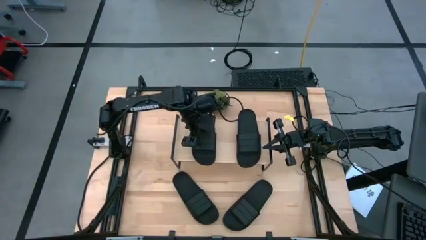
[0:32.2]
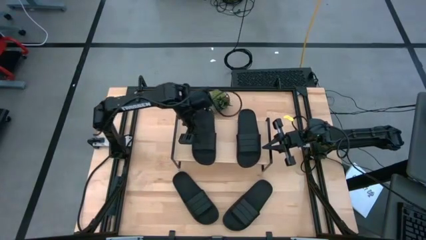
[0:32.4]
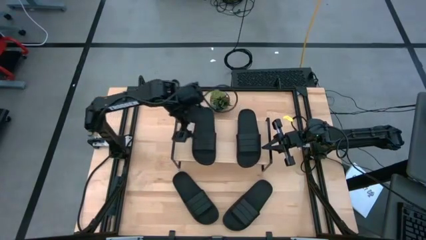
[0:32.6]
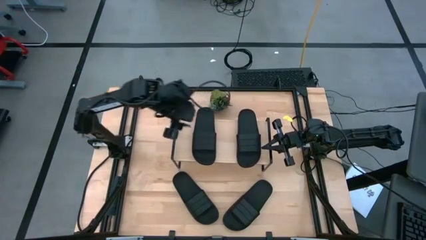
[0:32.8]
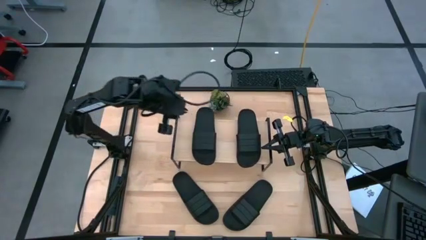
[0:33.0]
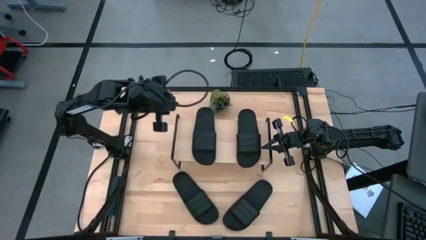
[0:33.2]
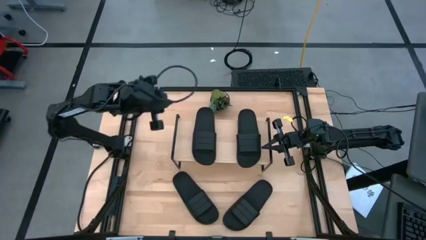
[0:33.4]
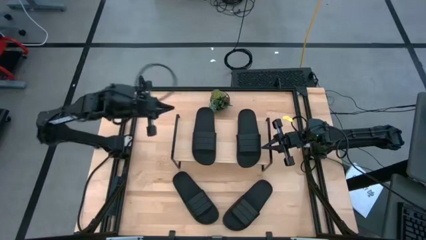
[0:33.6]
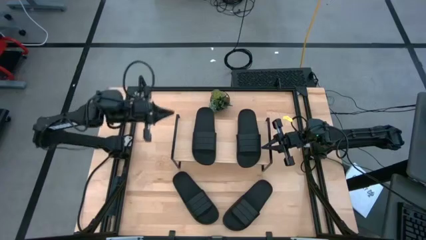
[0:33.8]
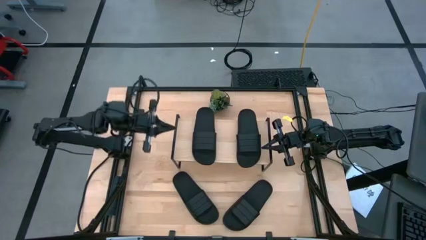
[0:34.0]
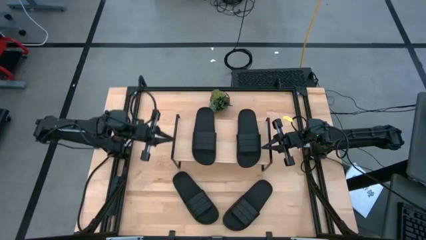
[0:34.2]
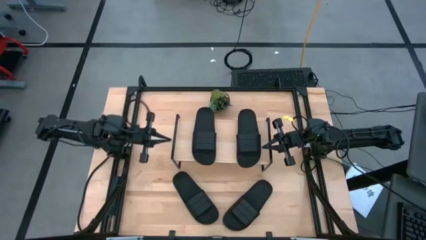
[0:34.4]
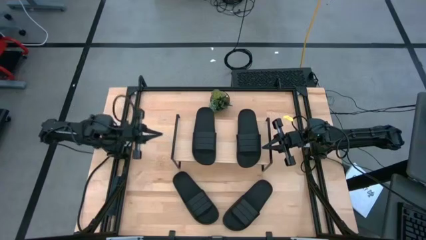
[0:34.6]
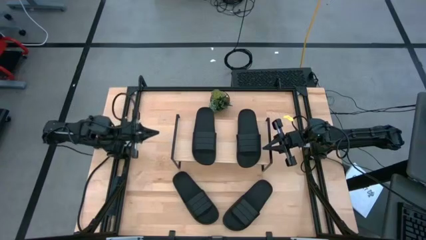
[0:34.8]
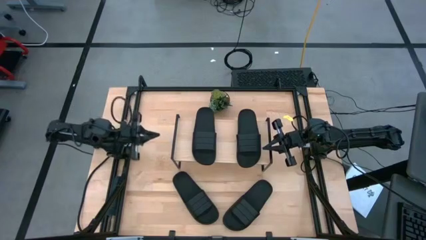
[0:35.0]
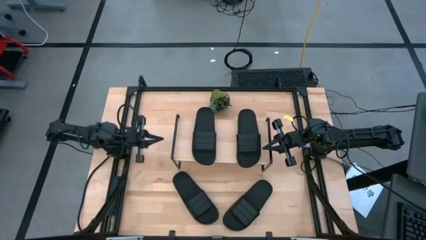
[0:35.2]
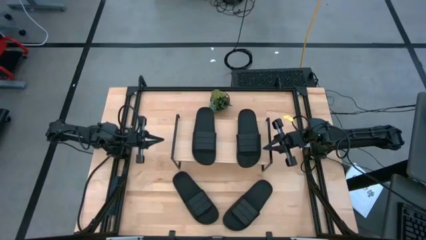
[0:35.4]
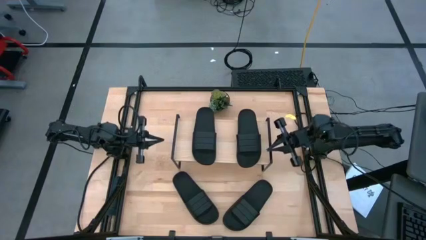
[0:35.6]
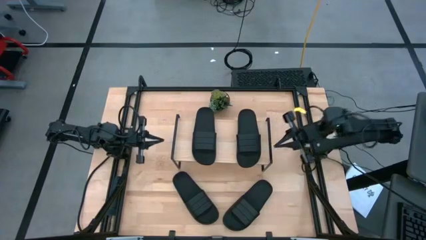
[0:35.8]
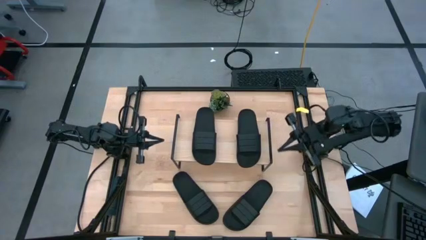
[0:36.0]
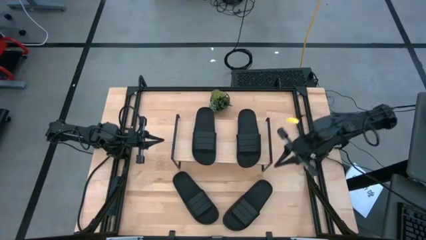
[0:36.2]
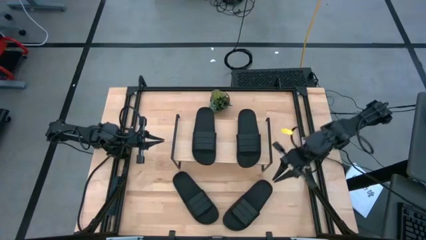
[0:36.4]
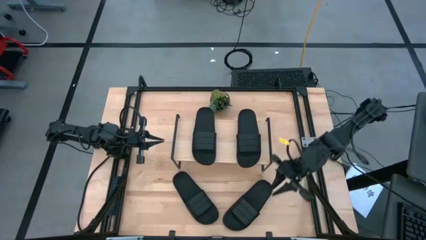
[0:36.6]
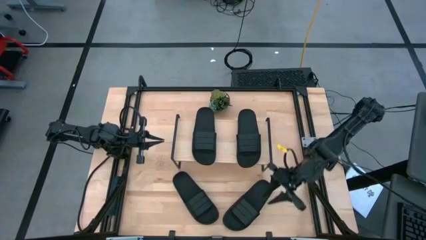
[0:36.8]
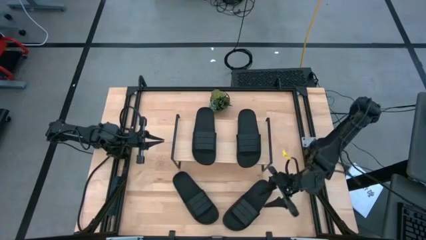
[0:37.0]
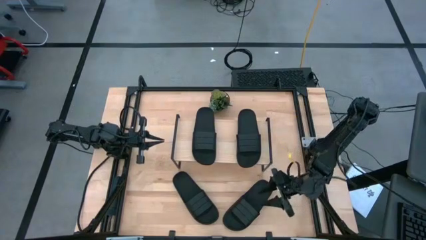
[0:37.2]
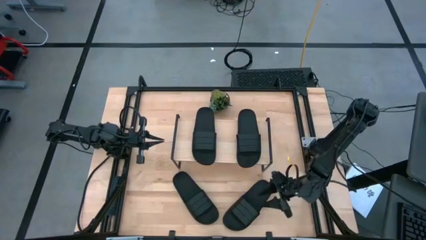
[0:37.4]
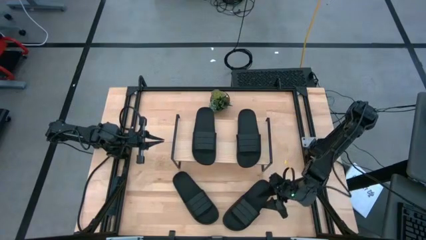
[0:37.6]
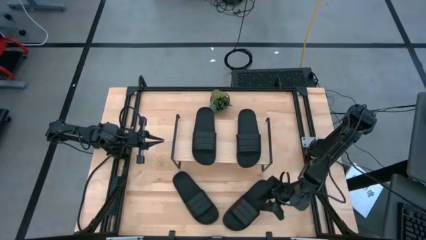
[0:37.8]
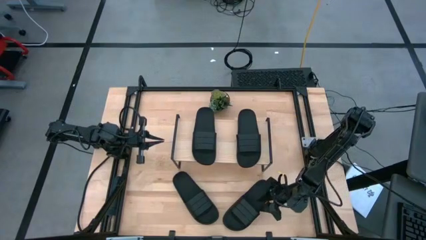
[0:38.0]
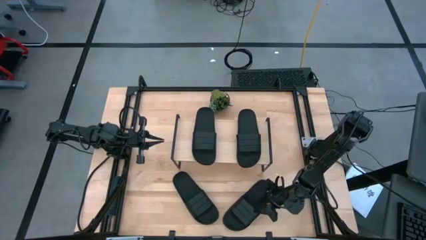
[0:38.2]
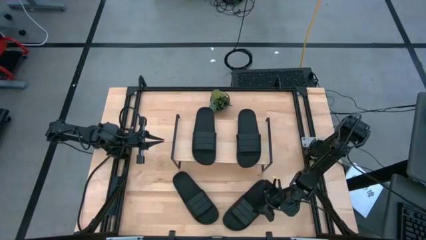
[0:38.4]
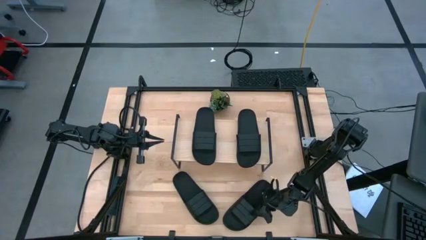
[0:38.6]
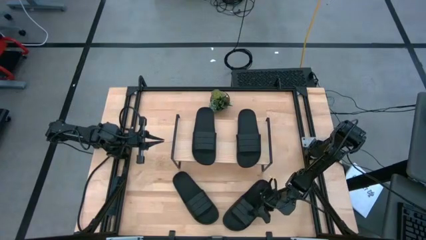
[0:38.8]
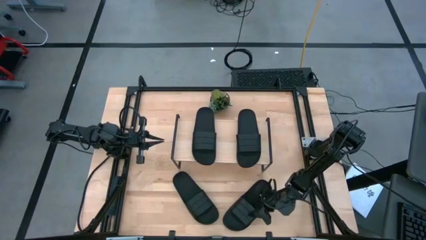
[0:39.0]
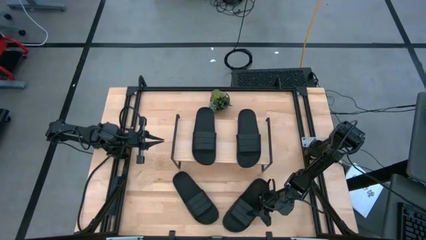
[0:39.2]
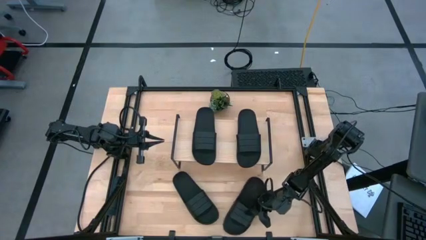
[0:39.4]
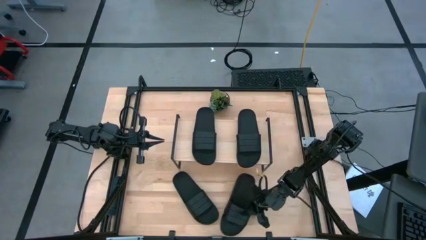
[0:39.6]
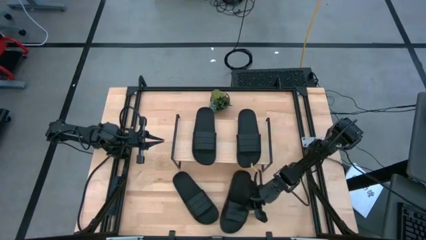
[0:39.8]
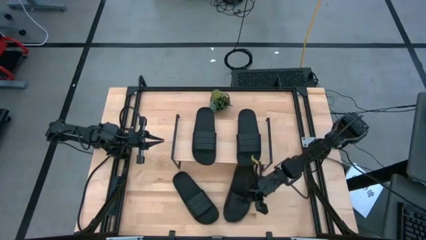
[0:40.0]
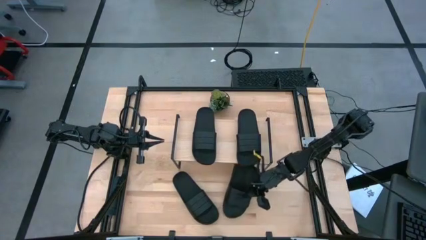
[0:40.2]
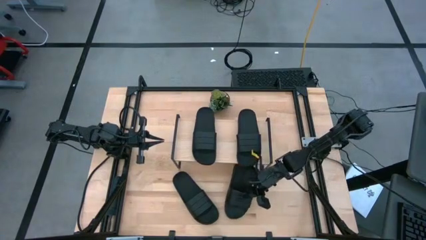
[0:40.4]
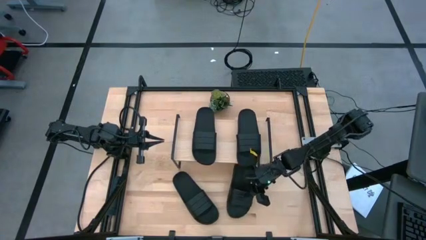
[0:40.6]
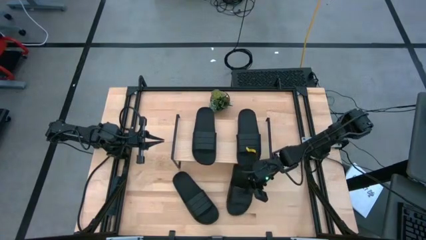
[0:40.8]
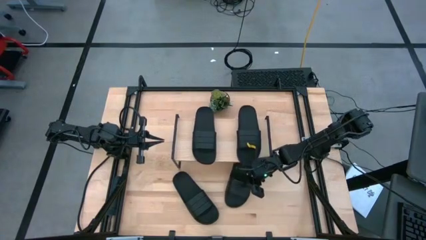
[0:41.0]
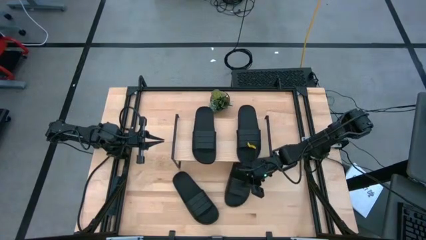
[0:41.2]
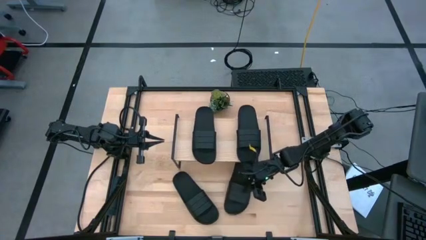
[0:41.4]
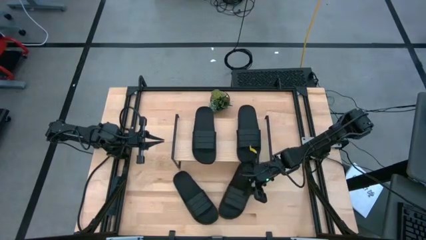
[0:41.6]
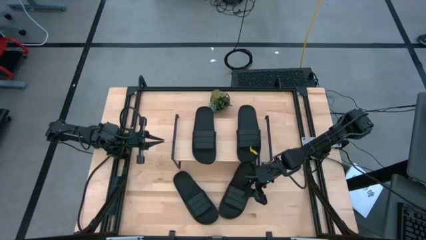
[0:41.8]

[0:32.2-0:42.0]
Task: Pick and place slides into the shelf
Put the black slide under the shelf

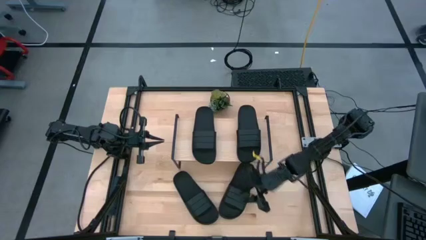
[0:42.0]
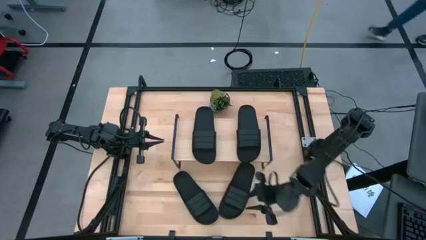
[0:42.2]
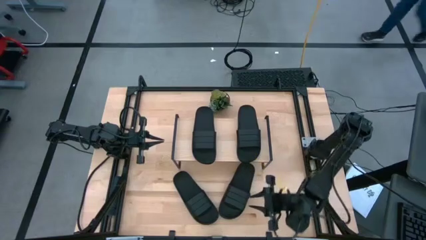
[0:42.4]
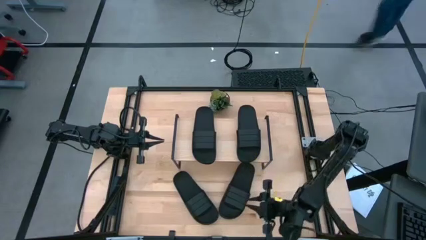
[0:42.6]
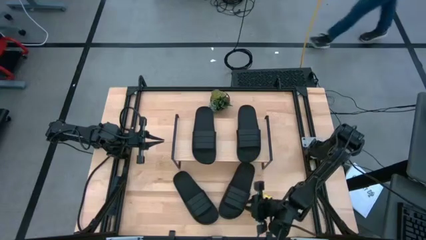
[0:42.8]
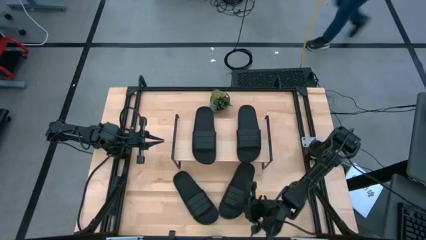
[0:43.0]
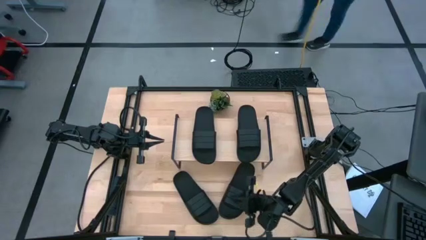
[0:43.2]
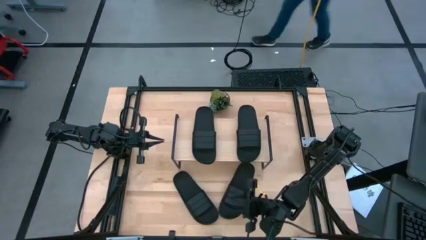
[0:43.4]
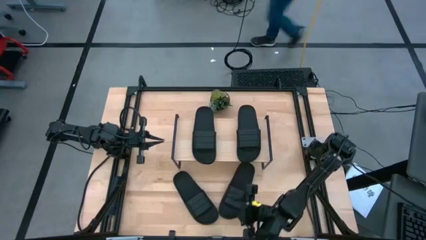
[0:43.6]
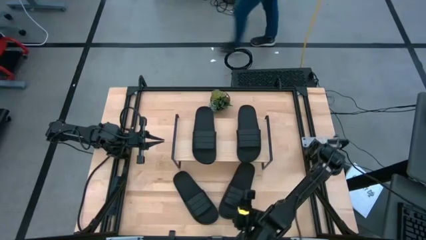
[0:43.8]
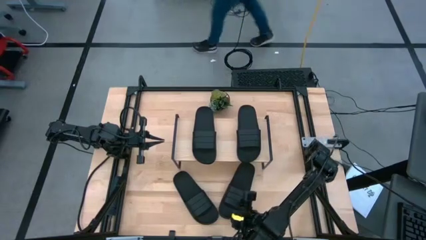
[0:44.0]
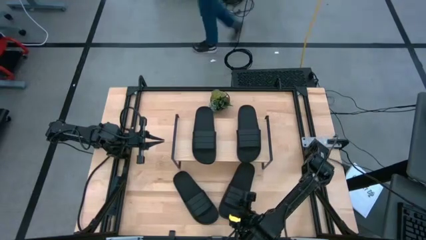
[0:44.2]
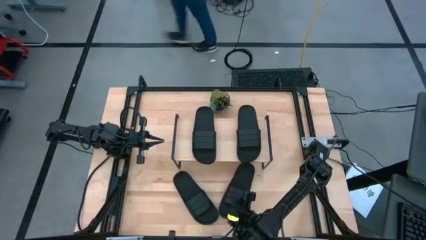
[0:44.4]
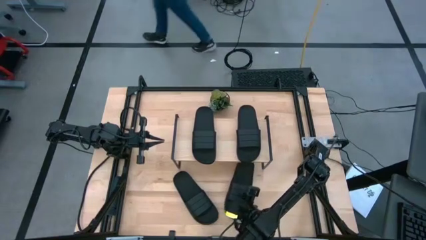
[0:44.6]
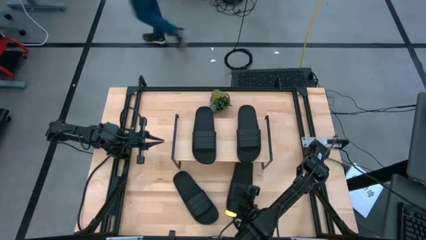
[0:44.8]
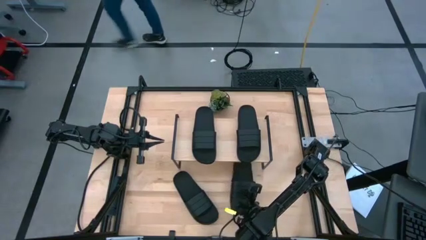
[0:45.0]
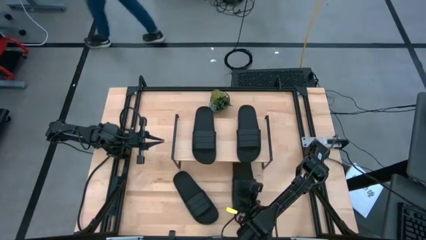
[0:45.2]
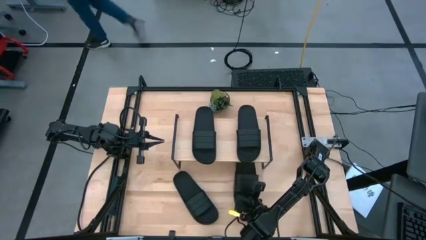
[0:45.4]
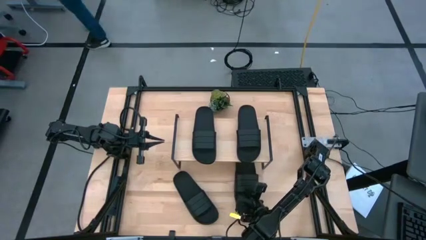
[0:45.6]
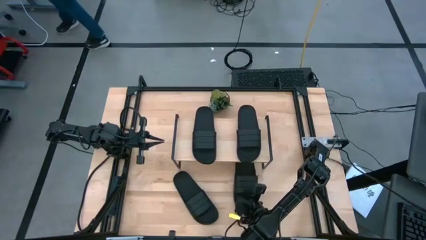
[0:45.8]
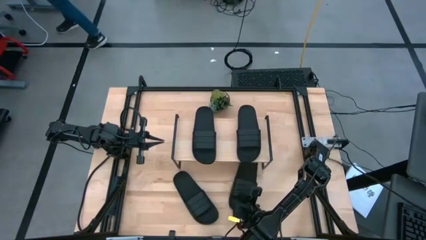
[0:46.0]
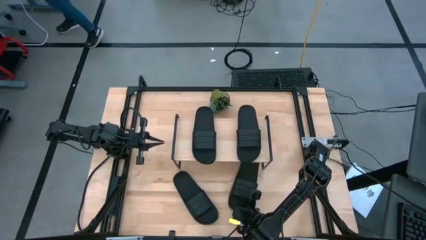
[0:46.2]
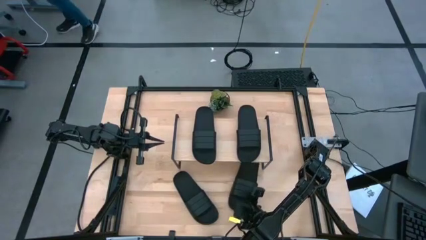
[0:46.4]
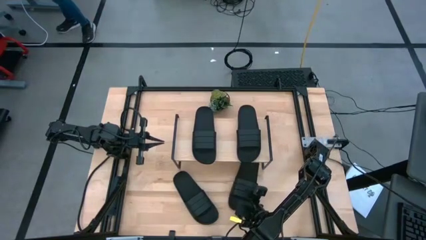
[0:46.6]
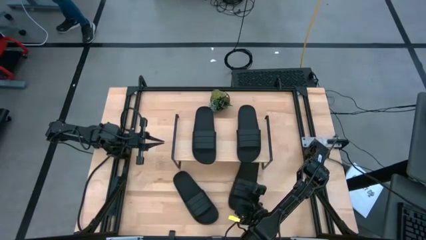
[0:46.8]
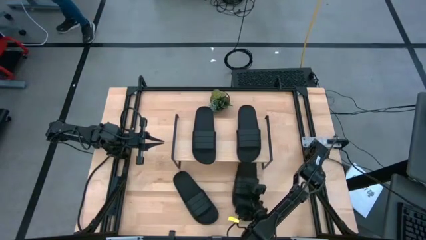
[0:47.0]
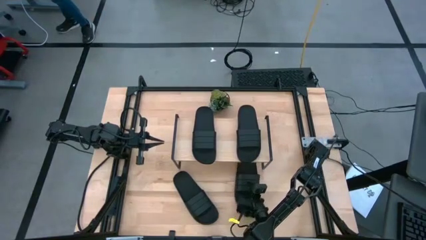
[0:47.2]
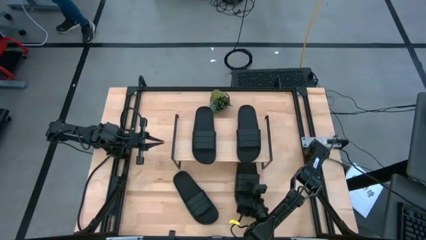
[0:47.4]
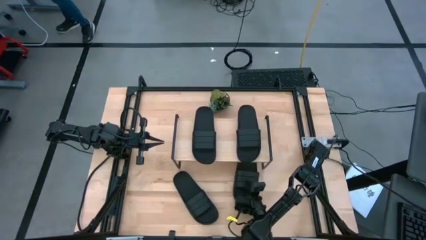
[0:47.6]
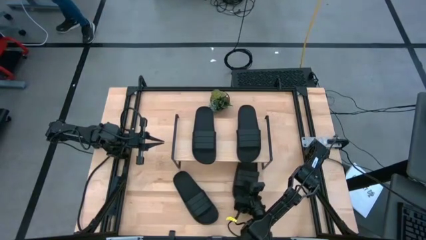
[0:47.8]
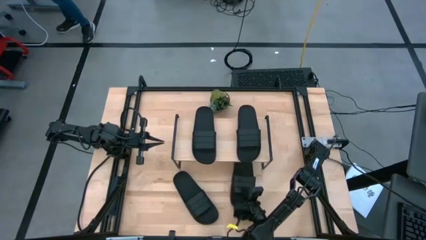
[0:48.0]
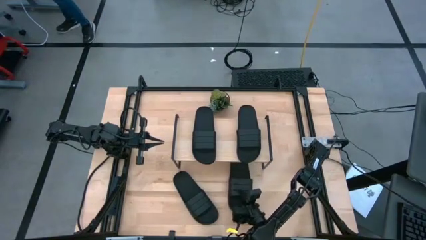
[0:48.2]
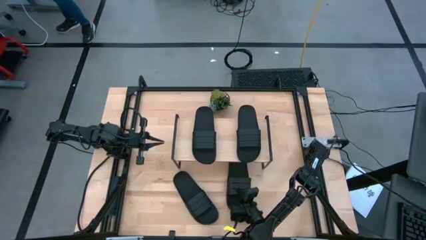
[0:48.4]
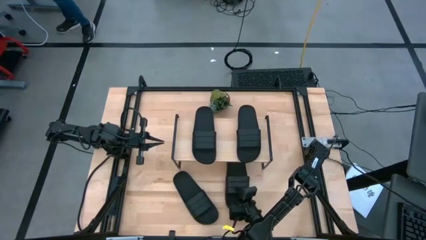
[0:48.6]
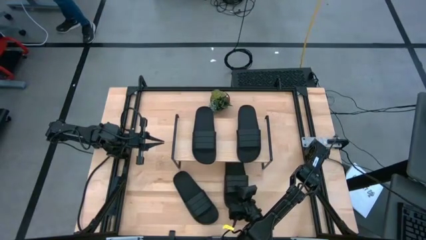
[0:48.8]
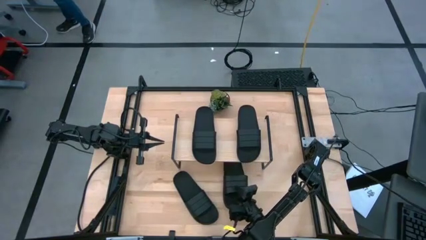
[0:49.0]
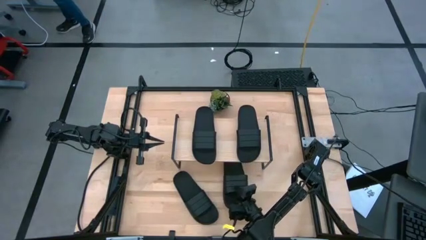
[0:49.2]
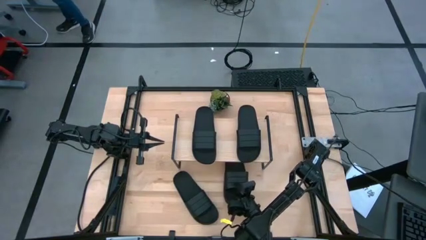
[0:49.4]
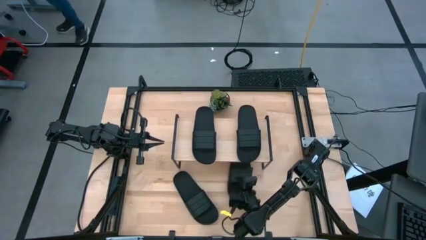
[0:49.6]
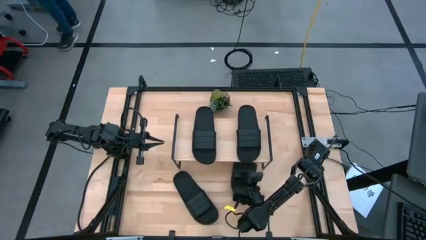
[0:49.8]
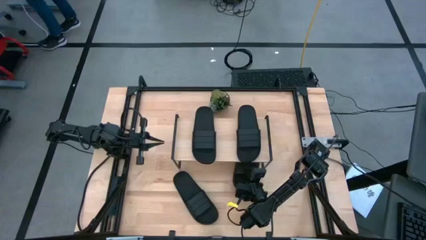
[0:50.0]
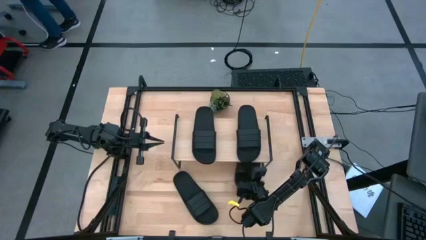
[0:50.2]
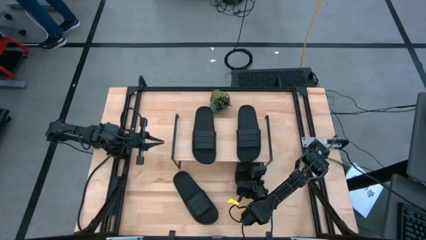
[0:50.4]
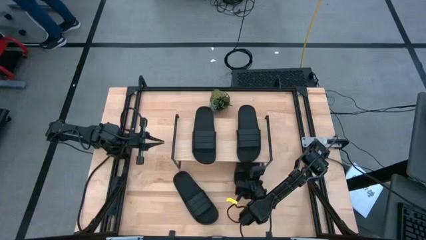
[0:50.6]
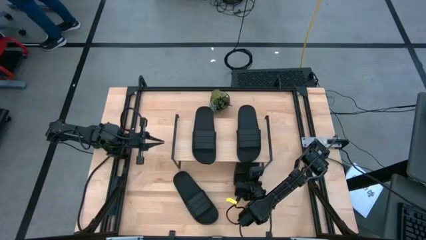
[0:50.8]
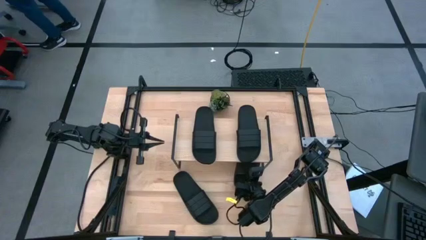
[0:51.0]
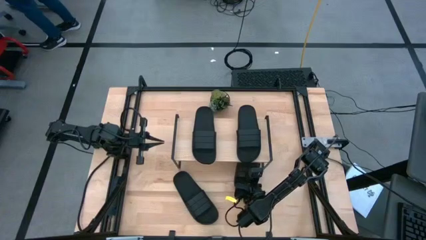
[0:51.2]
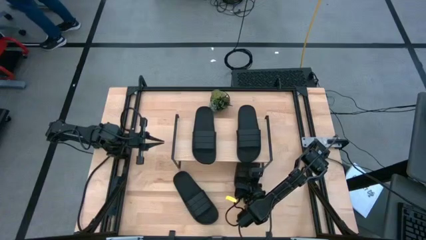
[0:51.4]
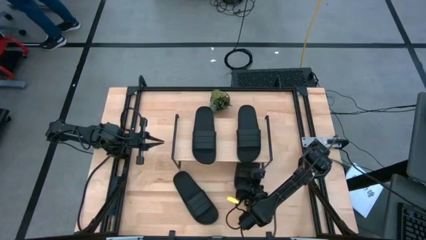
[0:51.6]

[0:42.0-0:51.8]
Put the black slide under the shelf
